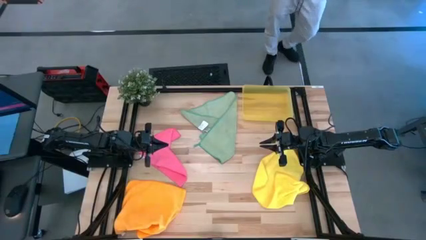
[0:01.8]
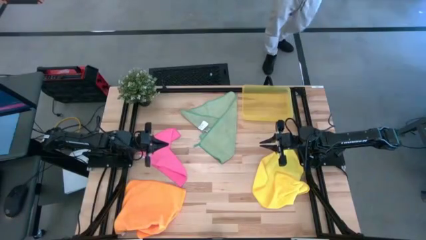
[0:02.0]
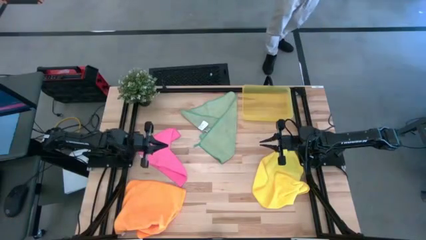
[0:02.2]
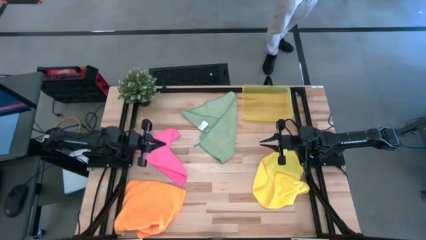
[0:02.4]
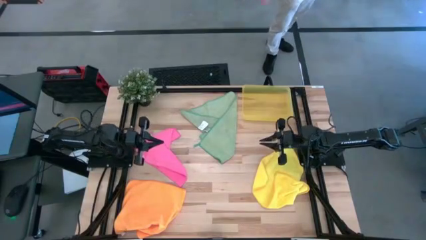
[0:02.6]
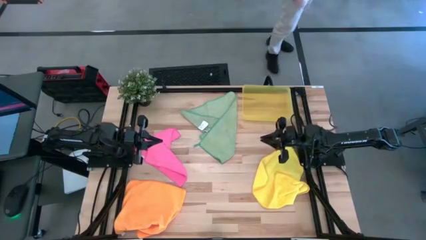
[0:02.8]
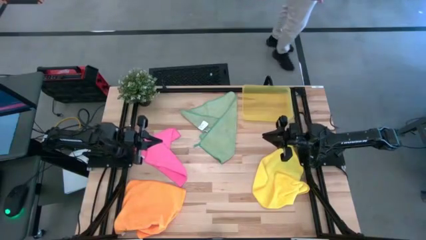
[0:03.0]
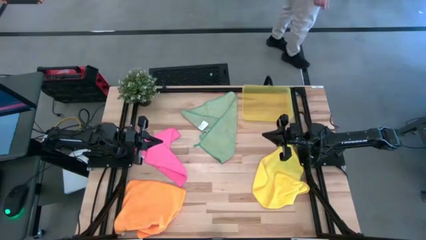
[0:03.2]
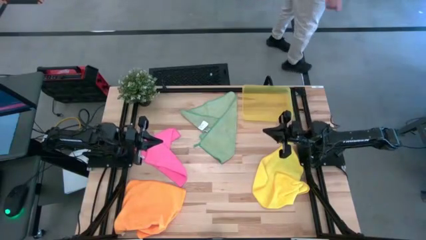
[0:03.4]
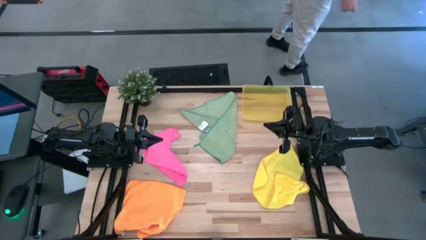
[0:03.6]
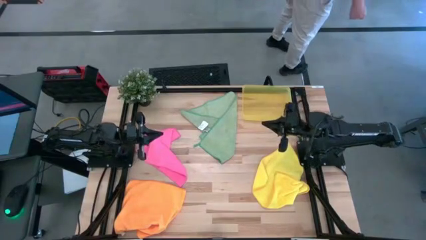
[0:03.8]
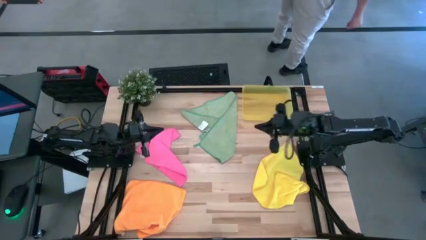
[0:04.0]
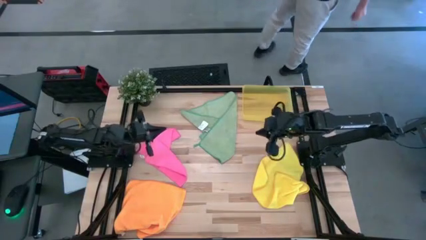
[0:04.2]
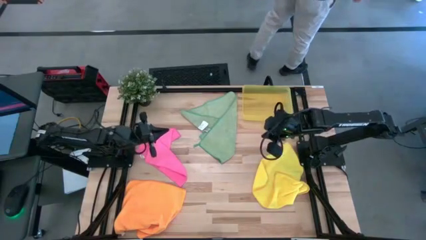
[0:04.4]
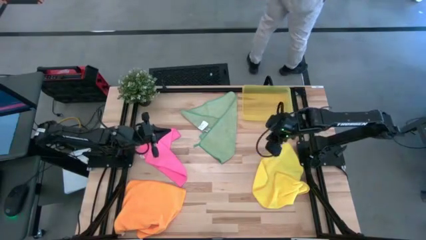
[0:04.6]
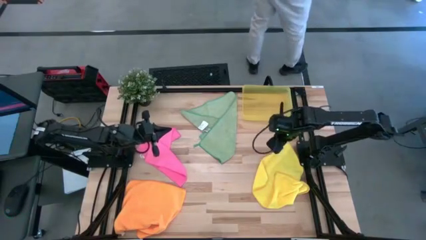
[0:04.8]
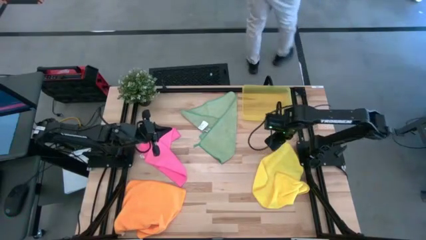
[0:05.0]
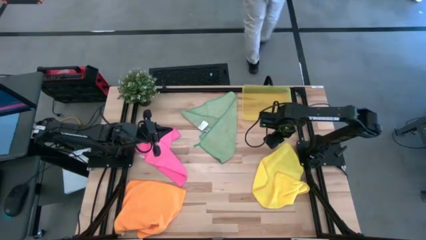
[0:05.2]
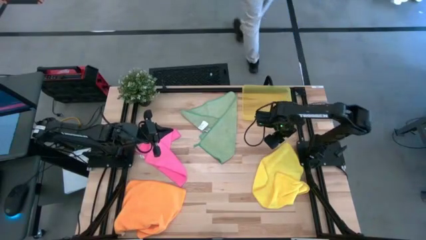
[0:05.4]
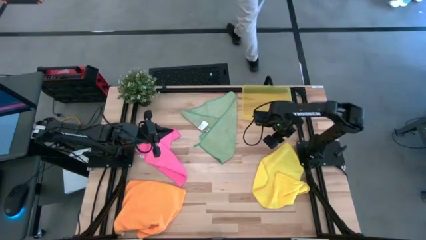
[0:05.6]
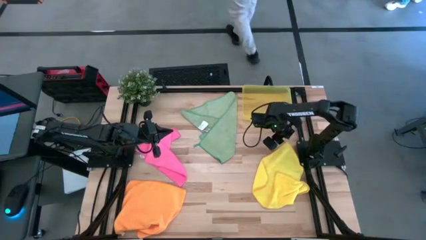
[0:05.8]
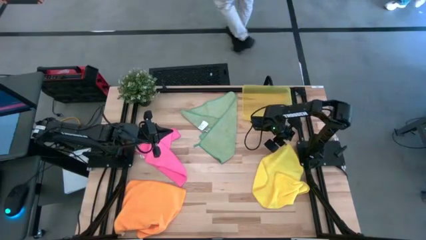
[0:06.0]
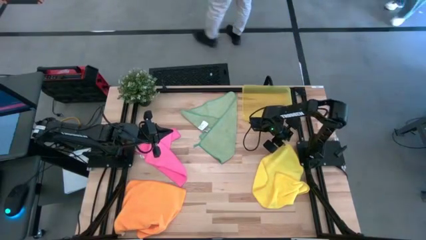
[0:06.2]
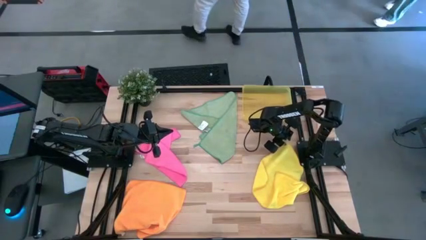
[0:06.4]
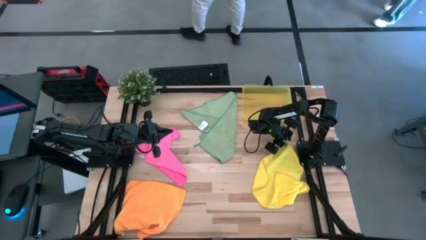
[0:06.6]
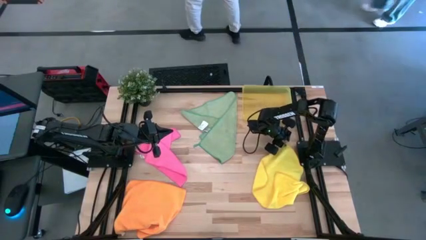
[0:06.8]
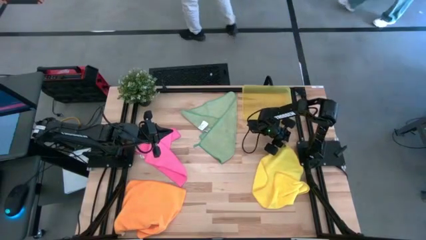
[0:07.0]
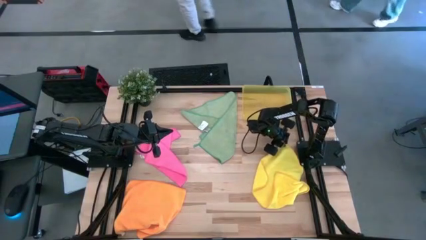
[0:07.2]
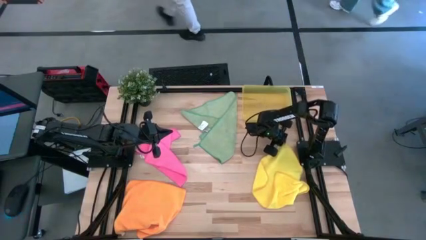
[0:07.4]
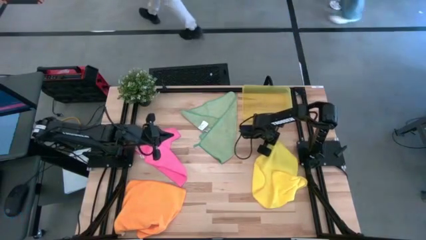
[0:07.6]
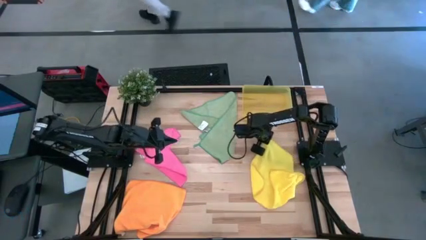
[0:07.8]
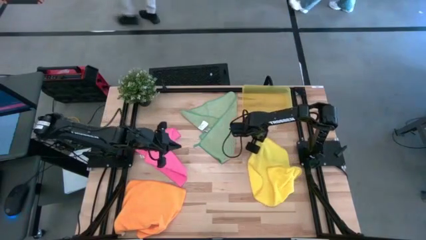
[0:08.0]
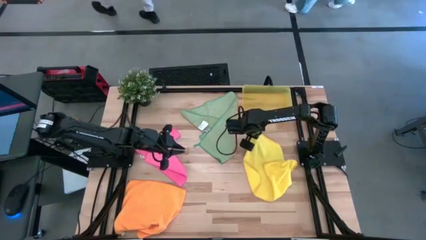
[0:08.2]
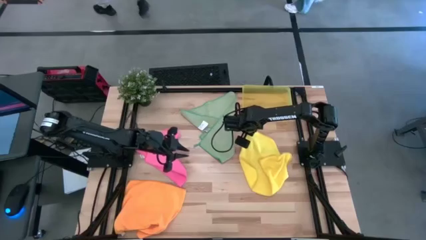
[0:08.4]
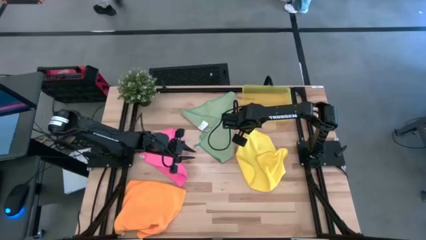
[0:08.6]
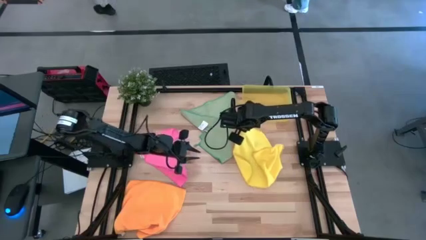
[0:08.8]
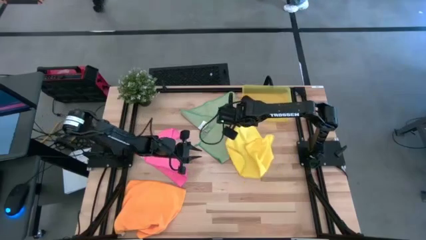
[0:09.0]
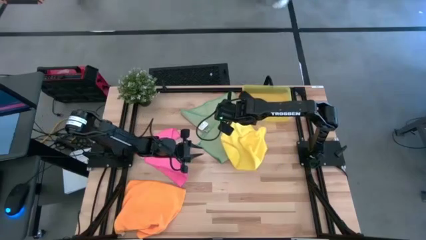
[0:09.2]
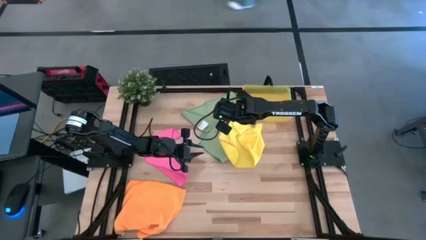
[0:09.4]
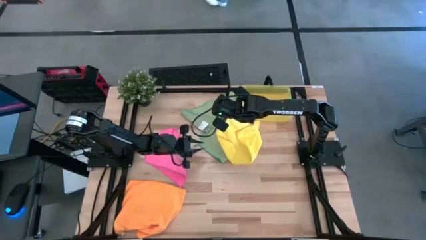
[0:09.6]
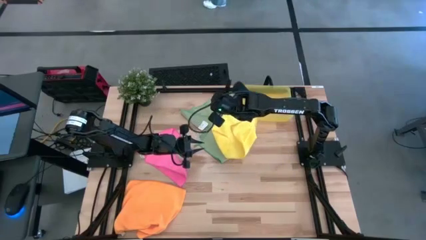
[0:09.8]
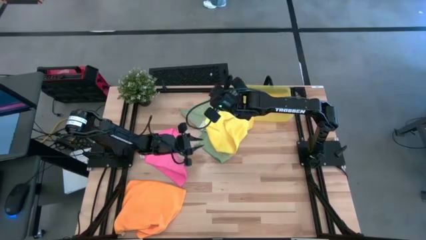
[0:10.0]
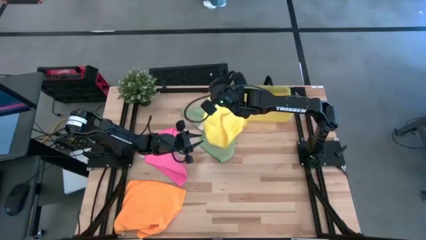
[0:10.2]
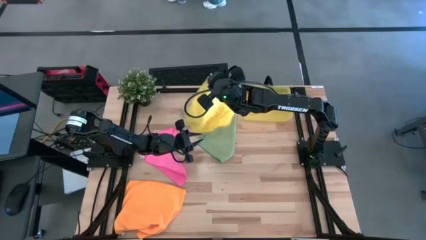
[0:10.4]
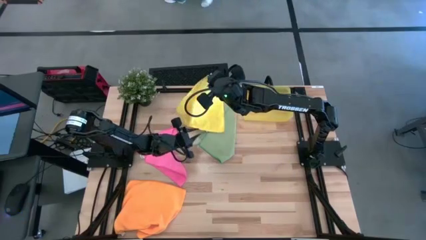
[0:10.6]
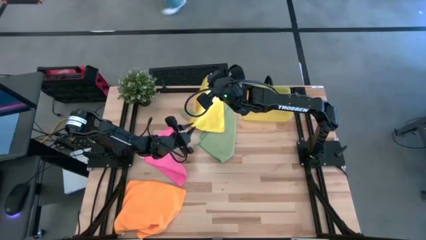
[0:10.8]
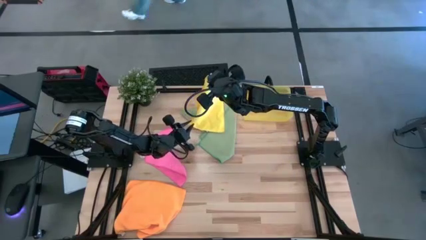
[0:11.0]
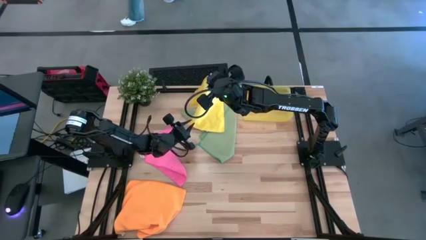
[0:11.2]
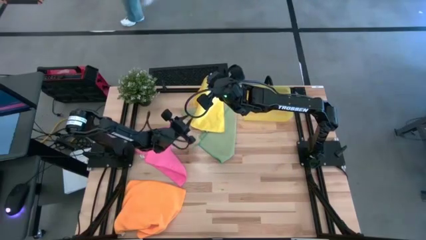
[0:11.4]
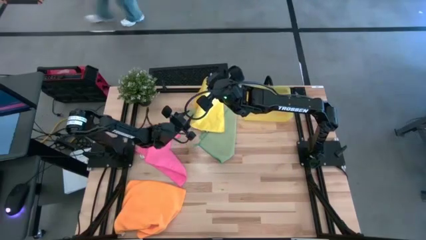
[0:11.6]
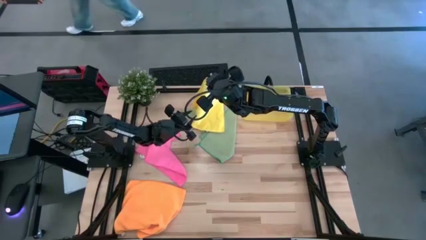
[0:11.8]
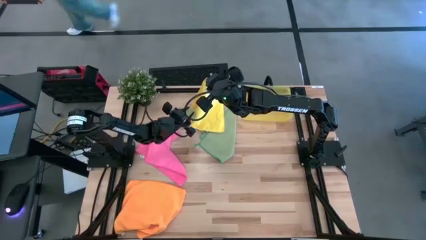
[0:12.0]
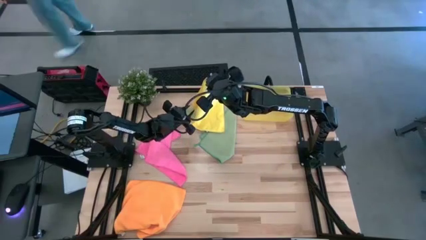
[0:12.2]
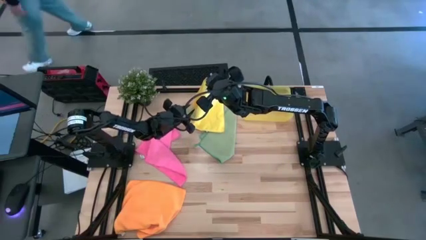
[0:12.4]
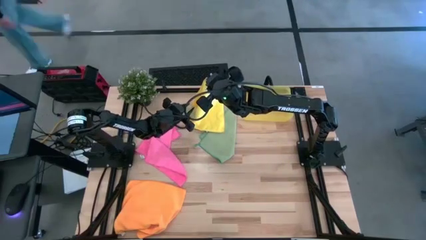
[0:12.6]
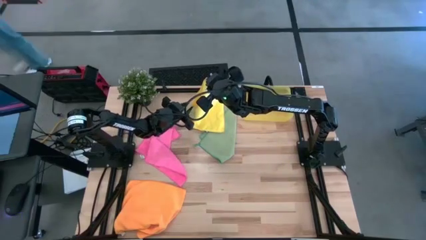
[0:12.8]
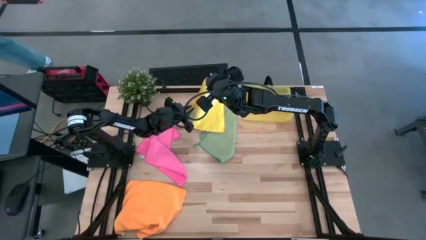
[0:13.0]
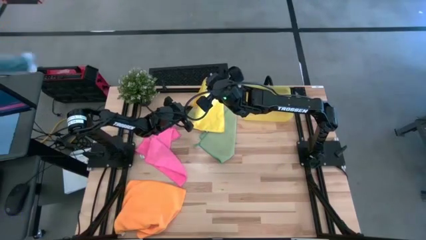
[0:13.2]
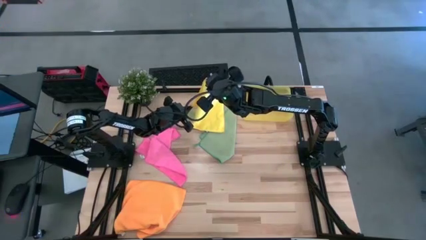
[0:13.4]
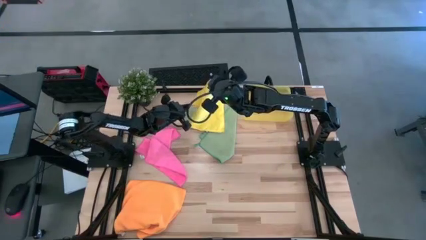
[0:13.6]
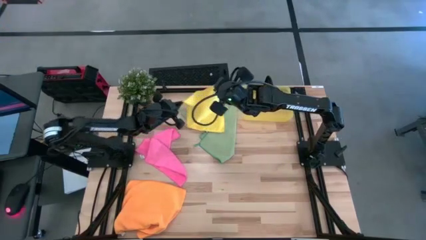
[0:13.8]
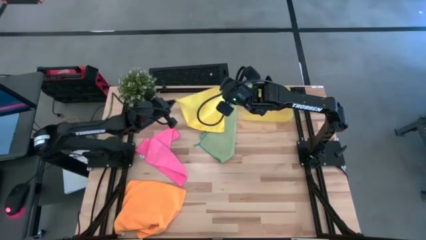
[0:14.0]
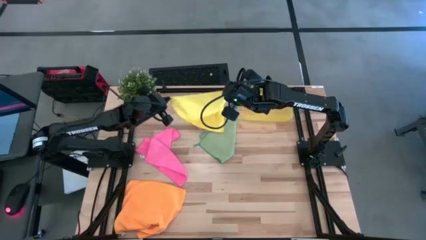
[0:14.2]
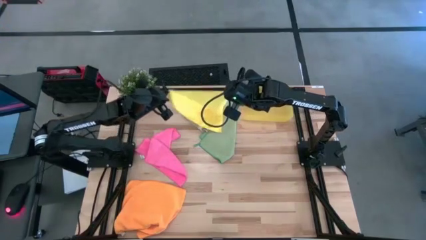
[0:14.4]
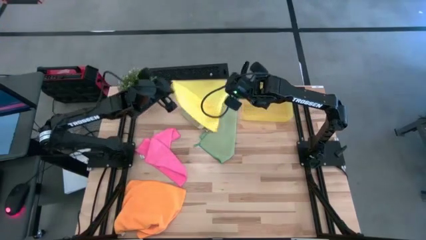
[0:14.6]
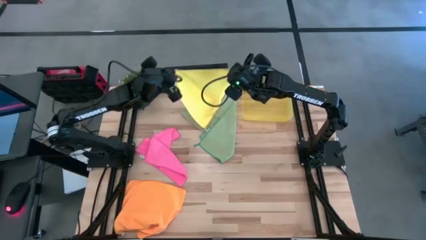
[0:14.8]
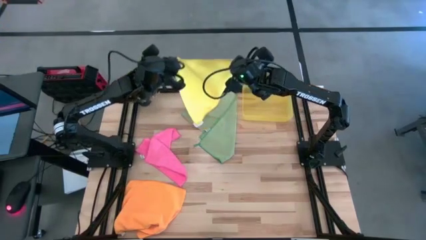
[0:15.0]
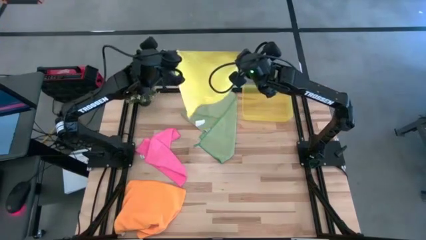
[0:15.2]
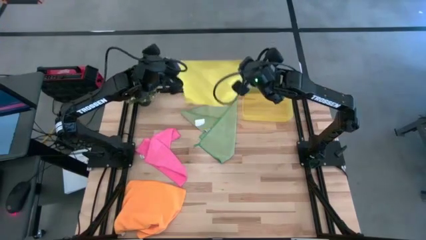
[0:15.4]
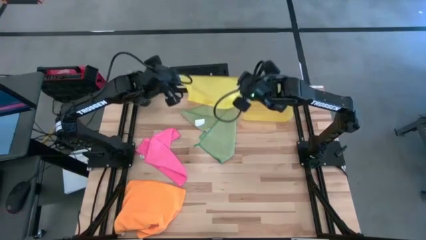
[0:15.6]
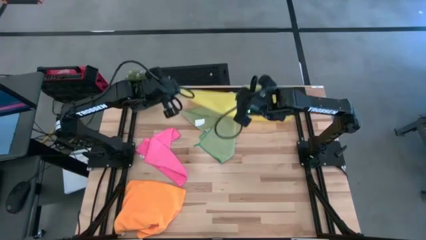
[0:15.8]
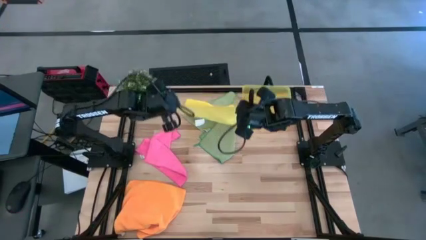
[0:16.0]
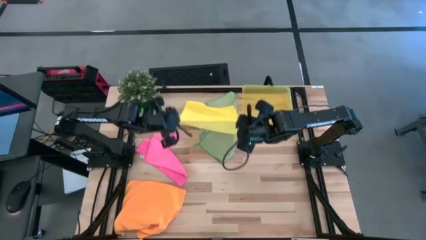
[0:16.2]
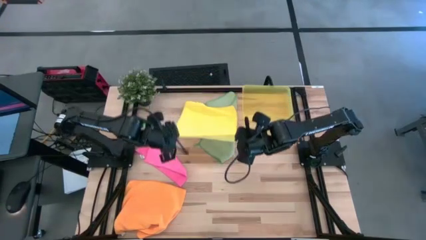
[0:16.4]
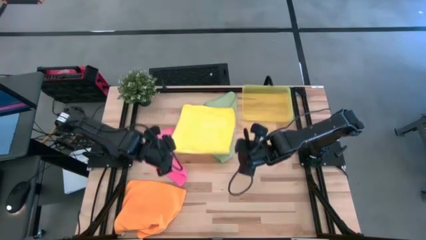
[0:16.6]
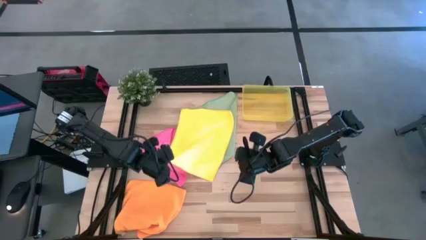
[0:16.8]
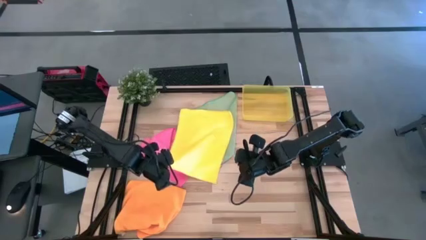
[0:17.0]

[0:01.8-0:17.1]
Task: Fold microfiber towels
Fold the yellow towel
